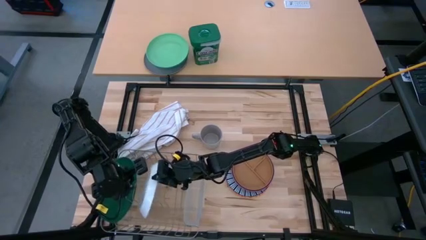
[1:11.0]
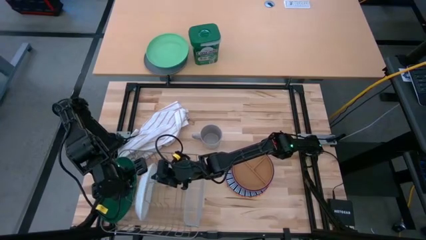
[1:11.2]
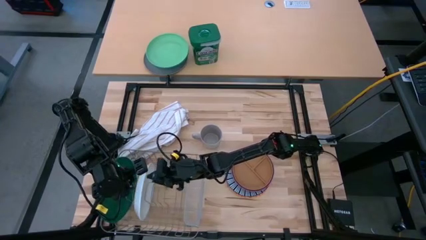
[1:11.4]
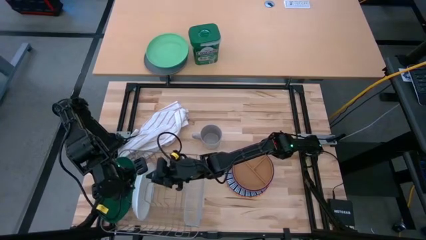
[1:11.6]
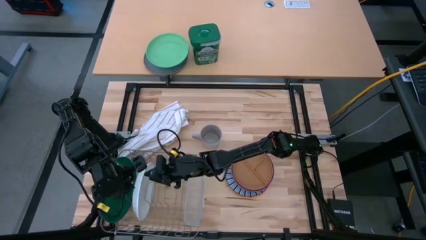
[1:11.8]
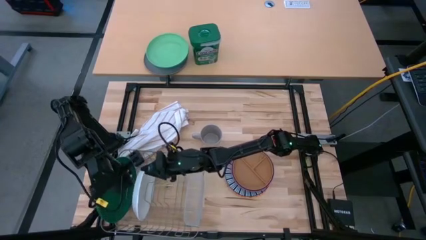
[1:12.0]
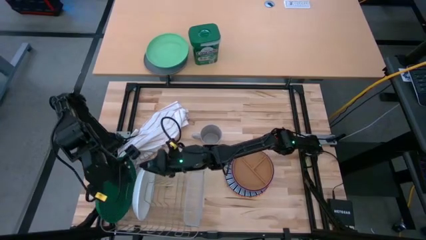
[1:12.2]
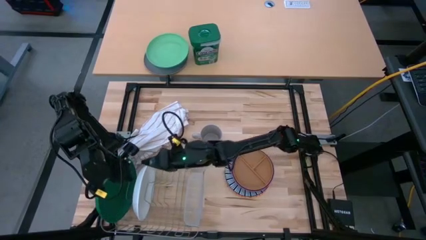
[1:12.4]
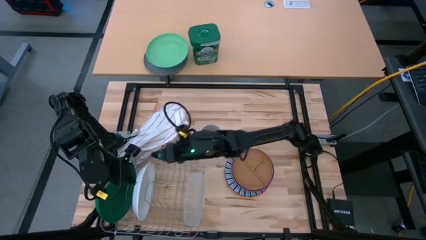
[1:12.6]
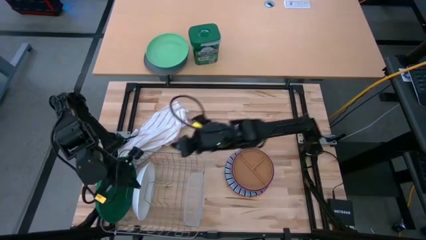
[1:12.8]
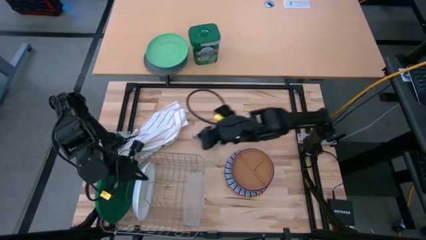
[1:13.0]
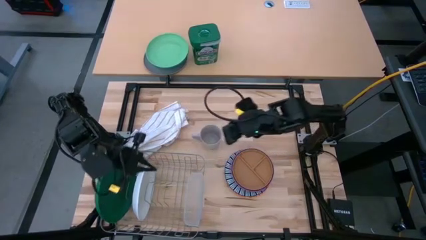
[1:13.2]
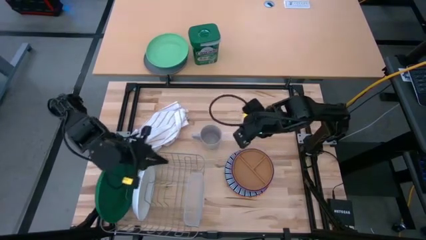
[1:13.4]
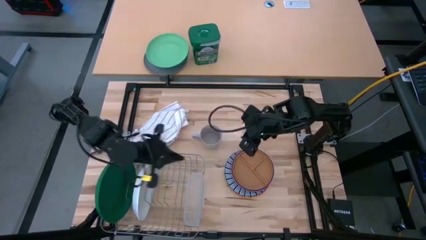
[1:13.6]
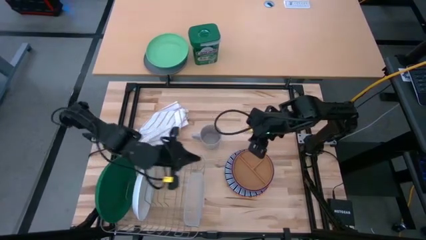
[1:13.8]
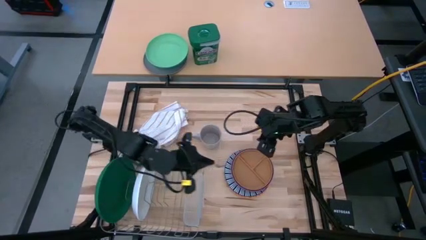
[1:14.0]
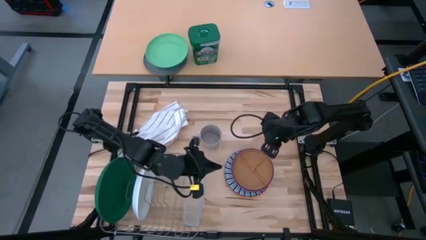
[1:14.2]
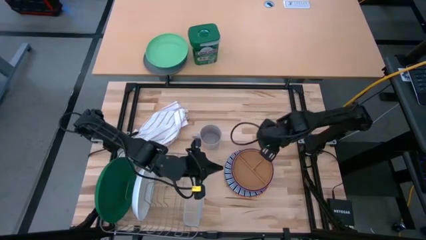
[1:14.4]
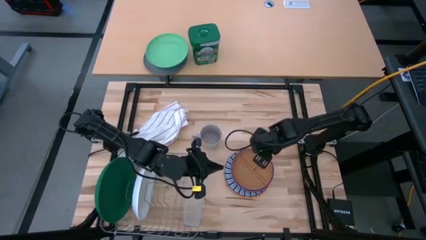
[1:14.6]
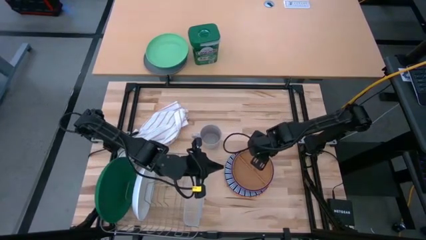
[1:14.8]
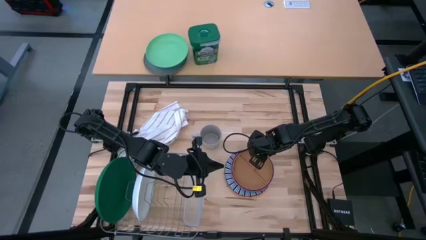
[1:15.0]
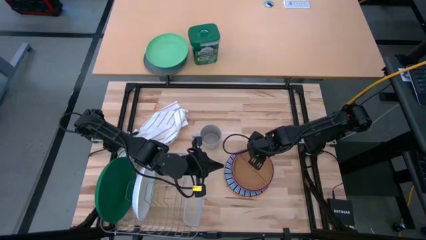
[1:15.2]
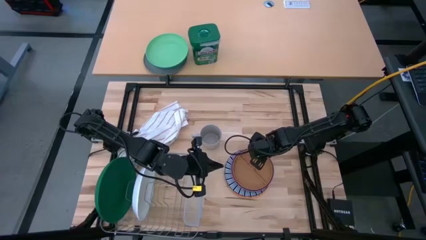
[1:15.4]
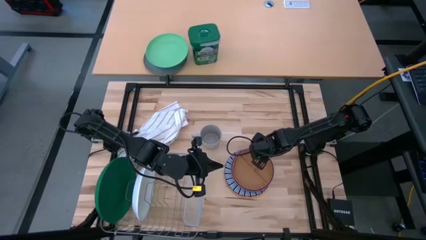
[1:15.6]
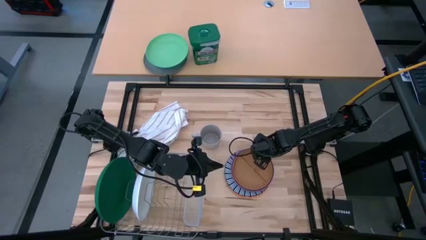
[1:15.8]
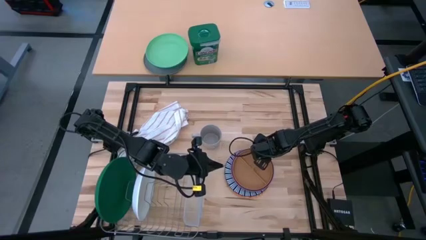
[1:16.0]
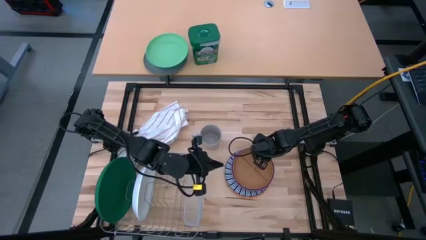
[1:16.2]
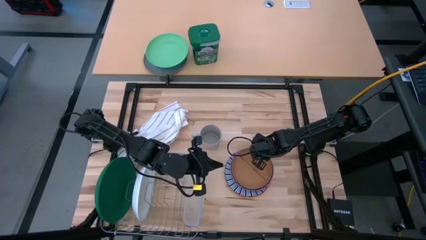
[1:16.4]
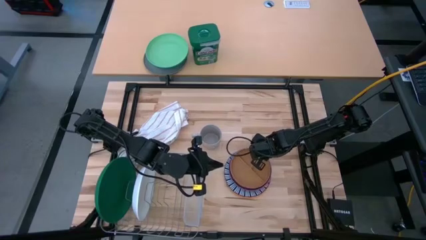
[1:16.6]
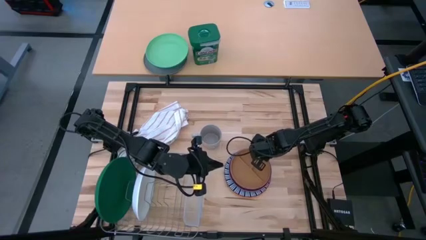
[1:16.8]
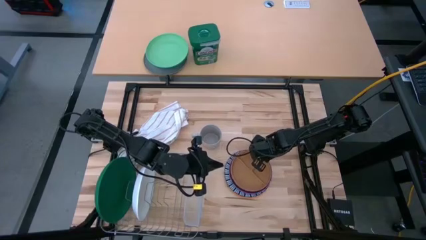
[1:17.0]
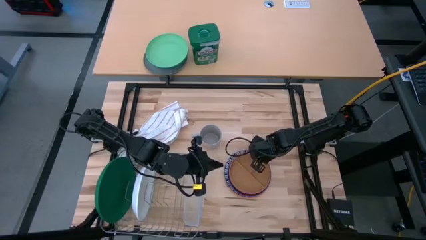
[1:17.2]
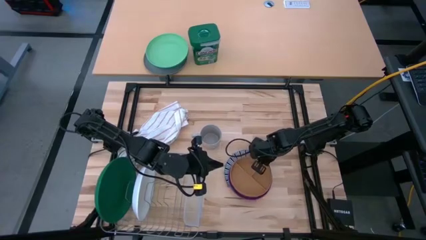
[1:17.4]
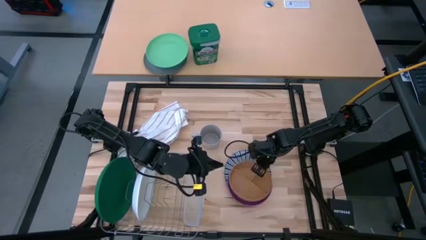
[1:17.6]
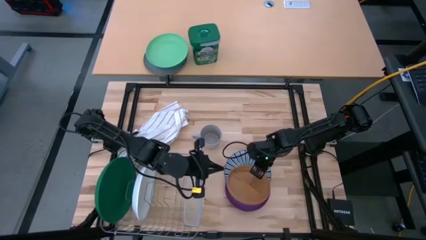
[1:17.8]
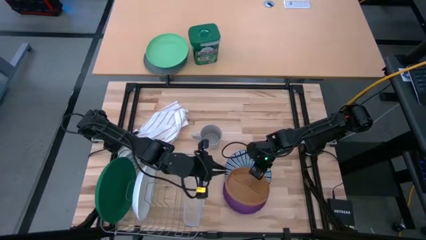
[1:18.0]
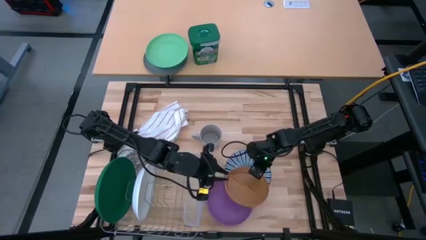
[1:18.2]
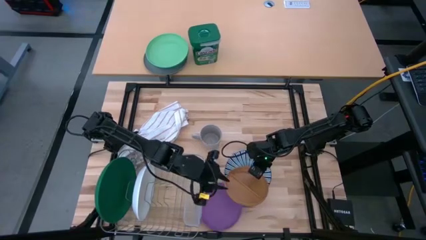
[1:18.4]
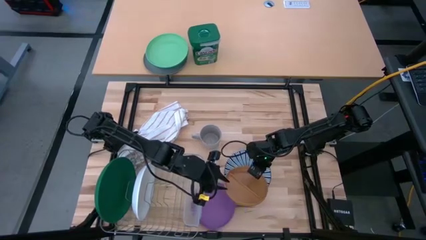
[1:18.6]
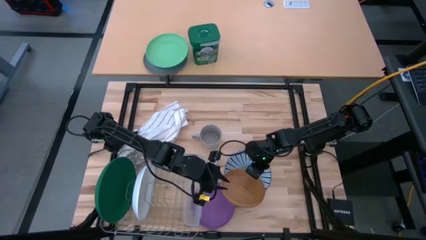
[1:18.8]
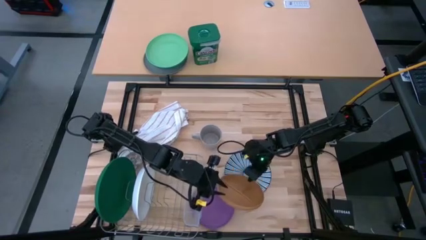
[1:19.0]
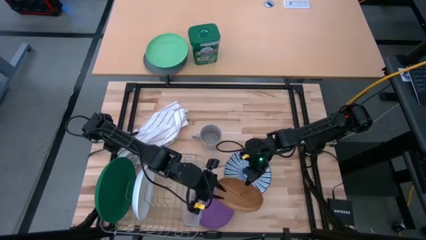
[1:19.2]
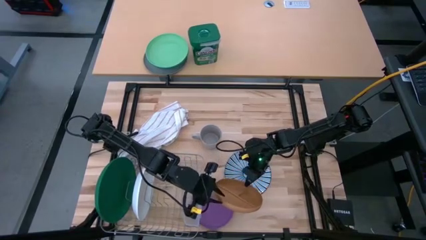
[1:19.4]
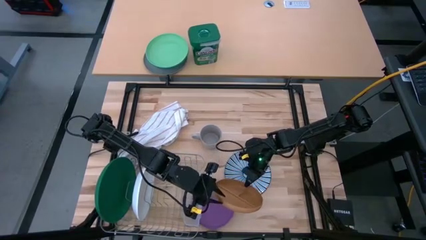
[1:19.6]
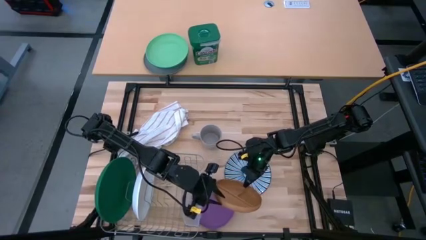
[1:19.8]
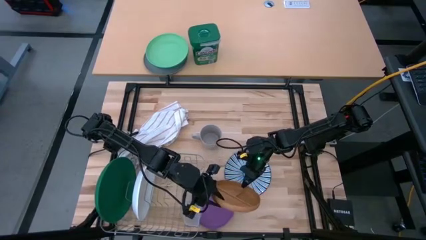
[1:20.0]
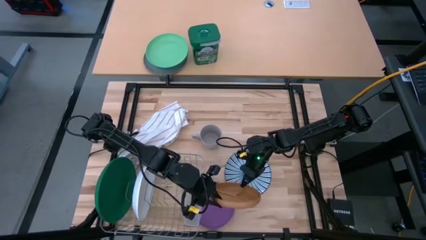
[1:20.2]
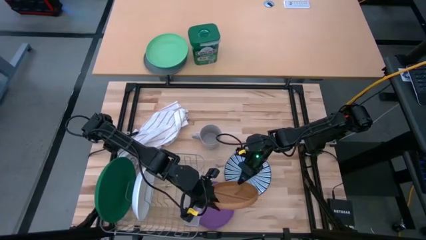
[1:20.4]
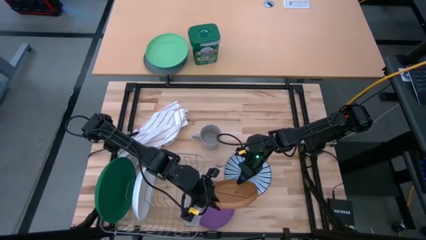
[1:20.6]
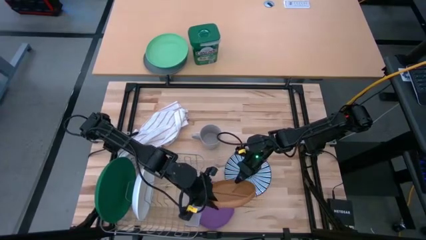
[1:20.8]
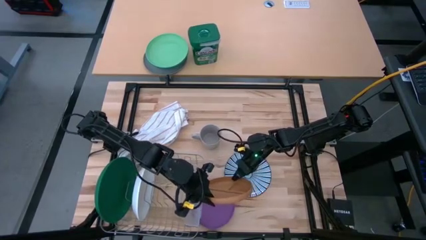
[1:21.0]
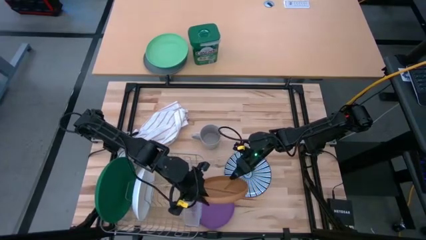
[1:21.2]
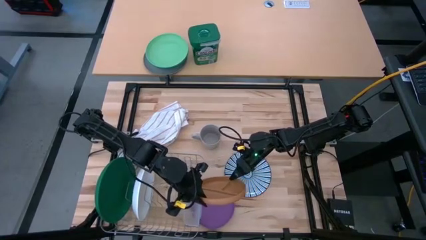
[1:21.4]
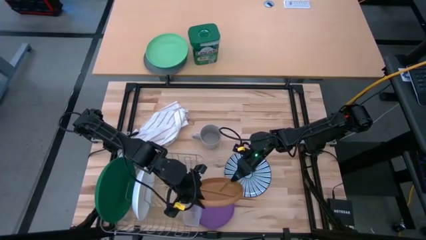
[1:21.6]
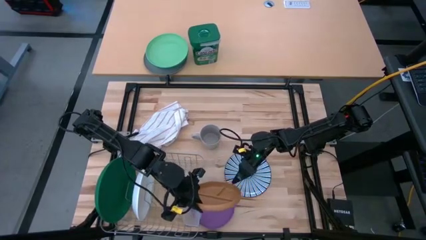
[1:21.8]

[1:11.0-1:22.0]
Task: Sort dishes
Put the brown plate into the dish rack
